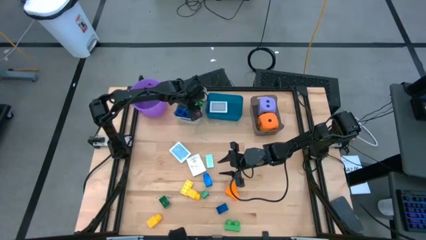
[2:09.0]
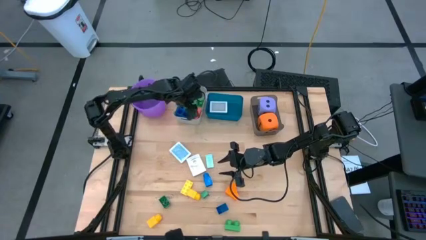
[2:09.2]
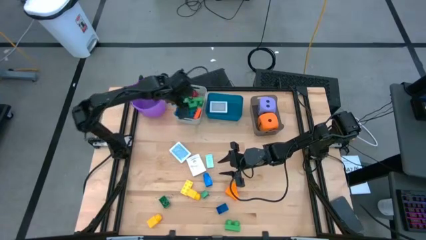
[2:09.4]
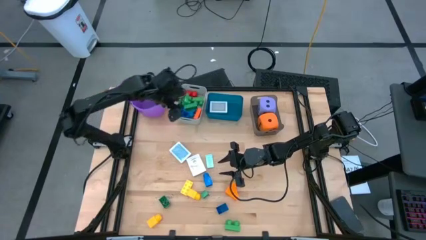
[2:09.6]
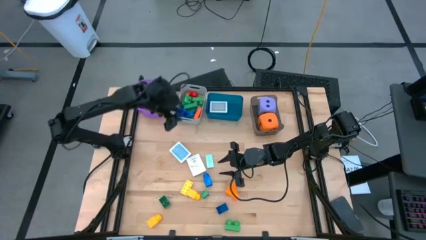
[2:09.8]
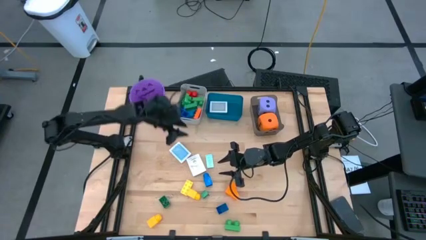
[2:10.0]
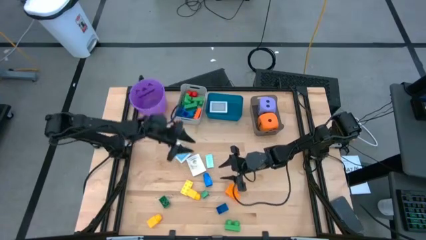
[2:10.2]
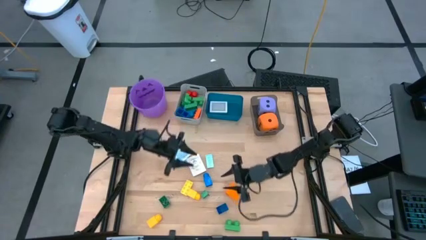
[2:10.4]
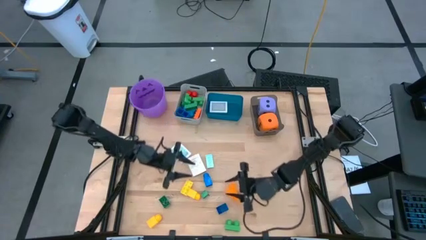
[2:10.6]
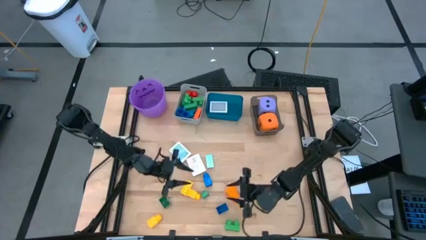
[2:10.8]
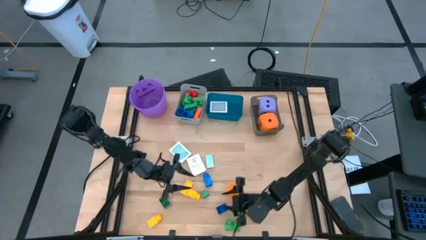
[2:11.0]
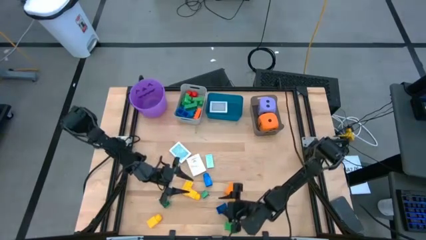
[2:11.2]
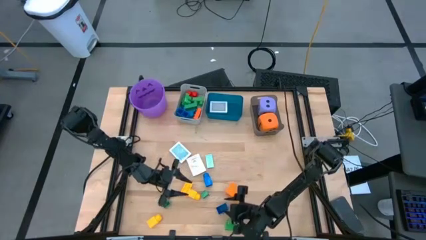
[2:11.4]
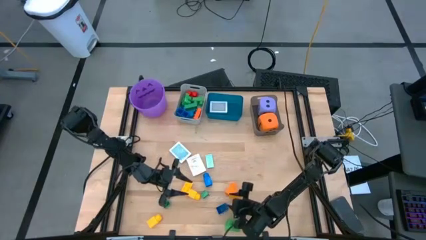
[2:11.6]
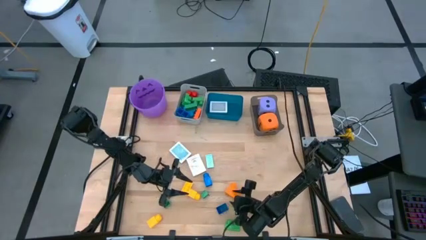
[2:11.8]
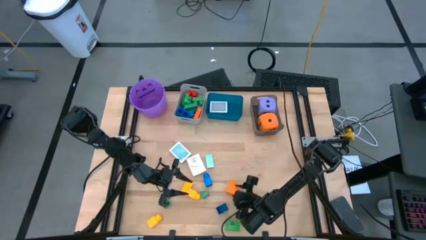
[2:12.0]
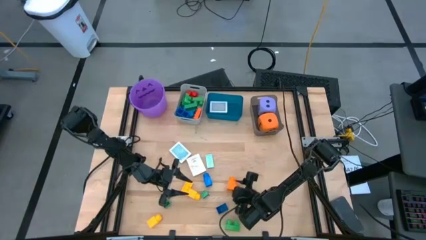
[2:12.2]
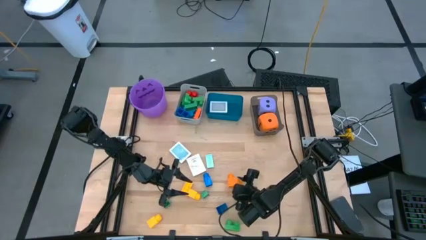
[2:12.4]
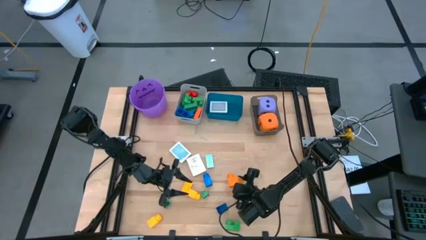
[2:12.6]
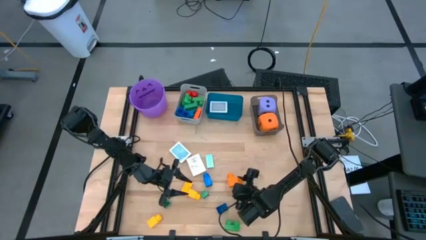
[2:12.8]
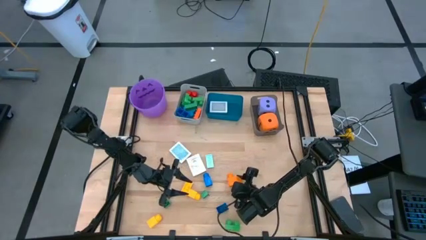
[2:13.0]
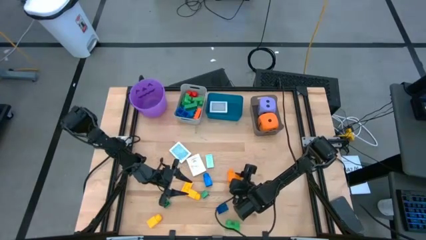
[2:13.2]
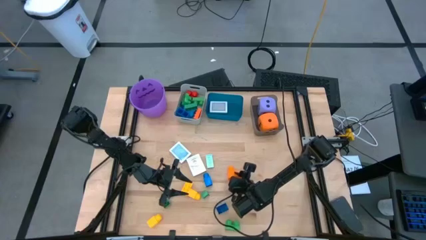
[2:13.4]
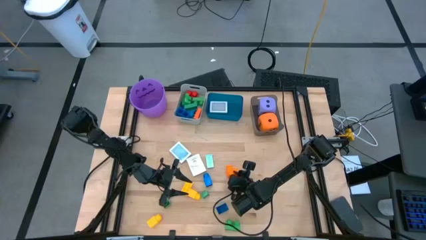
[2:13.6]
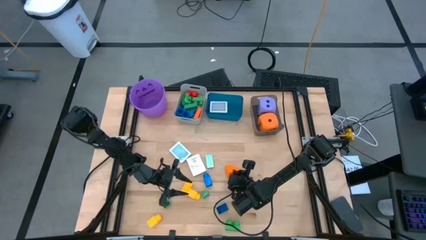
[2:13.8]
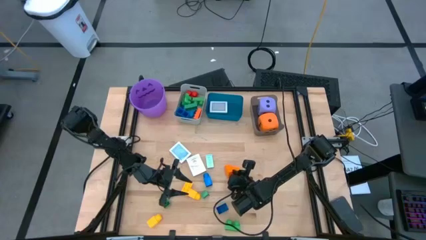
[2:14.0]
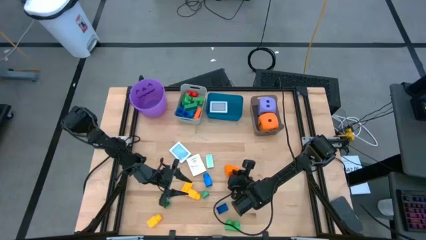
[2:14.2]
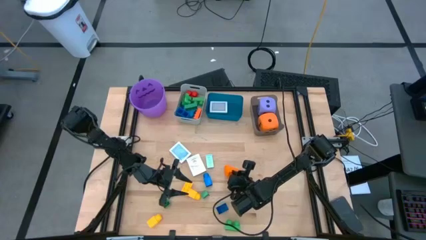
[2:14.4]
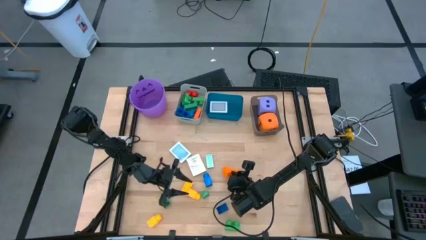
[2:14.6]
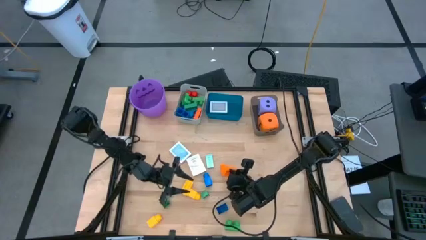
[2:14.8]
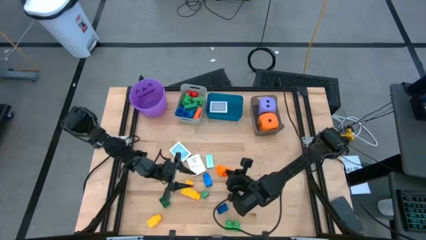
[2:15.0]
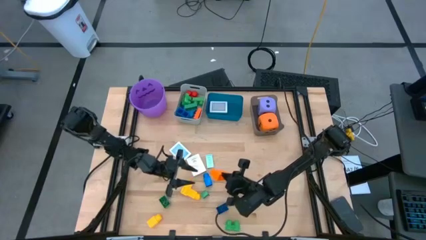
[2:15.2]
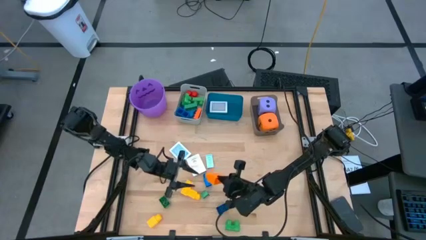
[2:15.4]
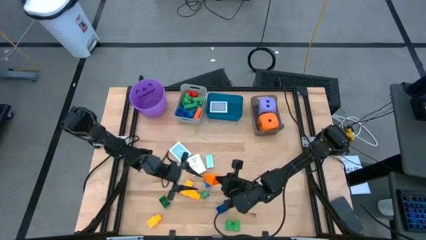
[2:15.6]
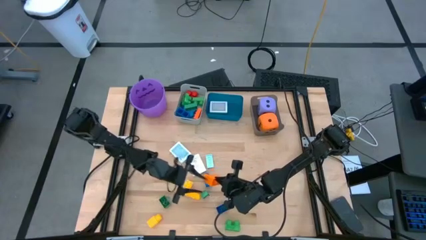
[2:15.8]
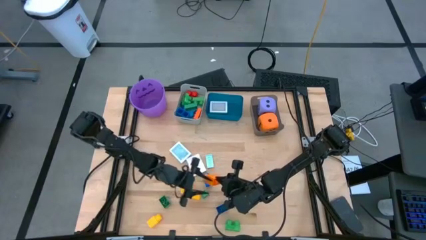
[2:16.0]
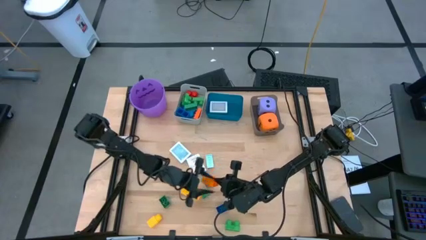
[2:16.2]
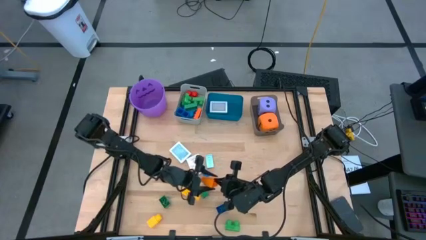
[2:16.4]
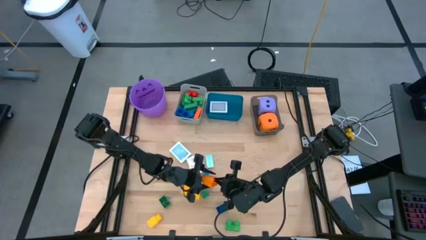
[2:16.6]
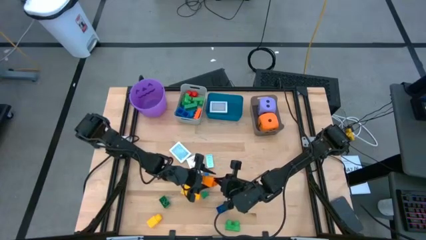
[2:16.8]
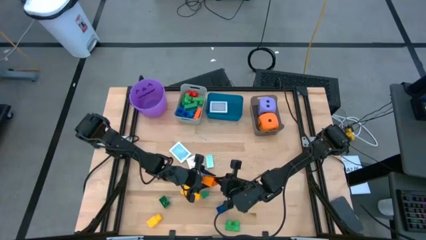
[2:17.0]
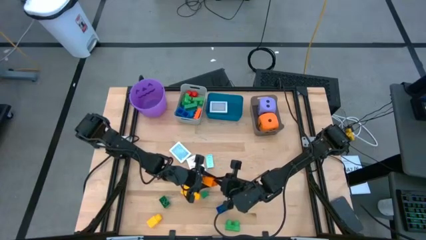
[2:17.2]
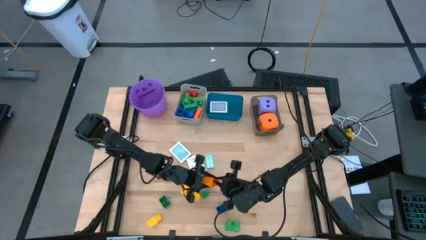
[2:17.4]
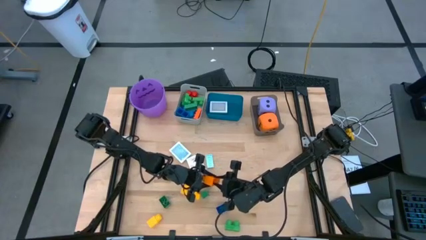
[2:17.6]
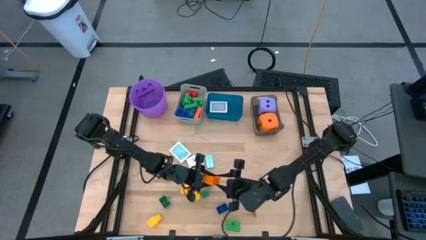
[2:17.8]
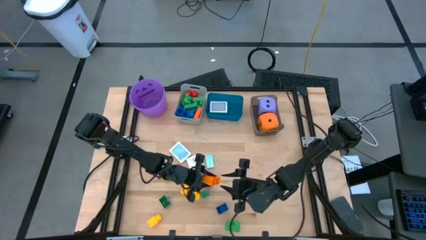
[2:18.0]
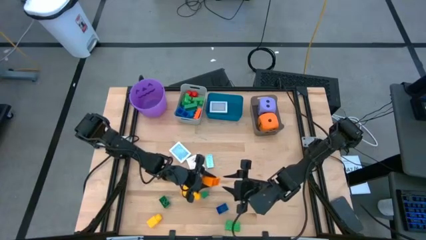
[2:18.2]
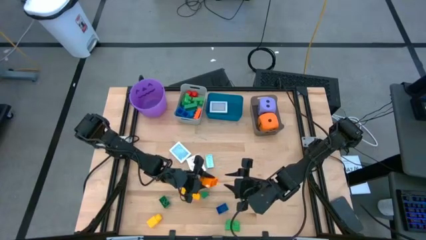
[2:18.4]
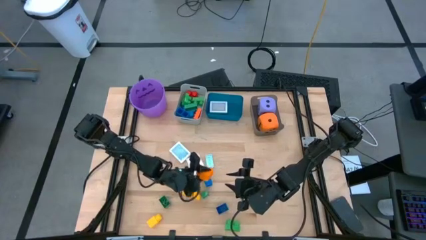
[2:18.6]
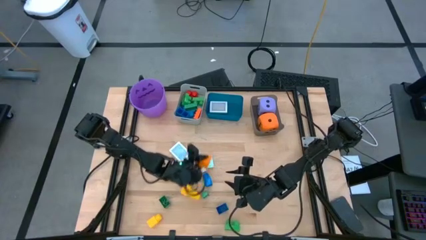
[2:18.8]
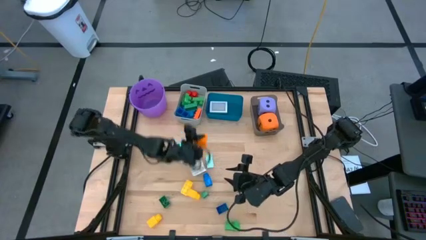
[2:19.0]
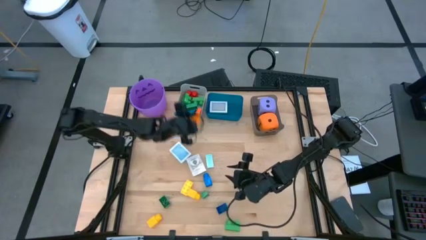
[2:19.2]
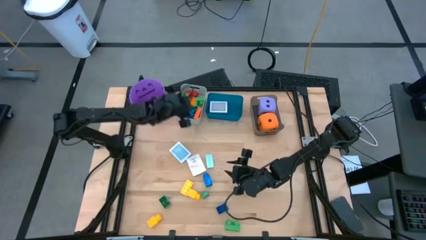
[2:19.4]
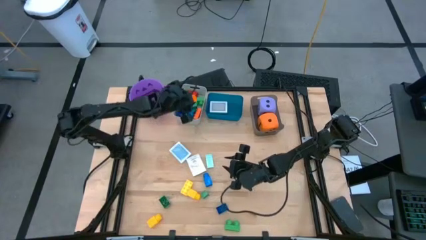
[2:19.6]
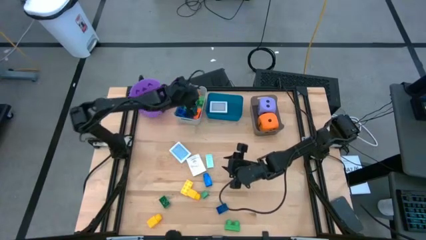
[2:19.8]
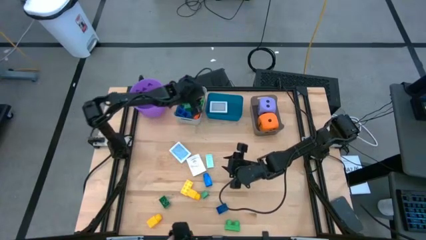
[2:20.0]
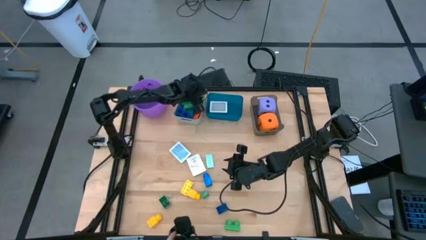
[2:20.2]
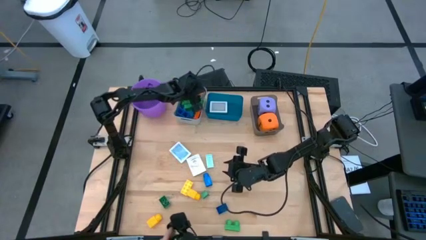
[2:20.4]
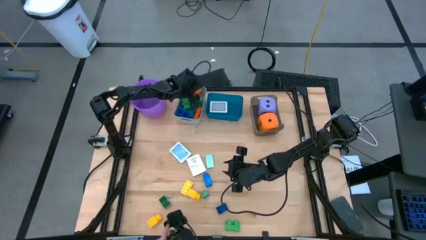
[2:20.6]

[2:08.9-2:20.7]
Task: Pick & Place Toys
Put the orange game piece into the gray bin

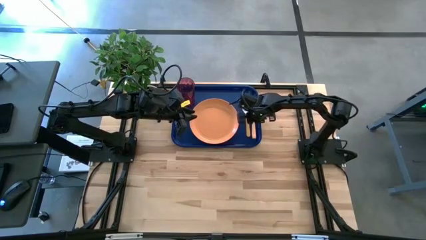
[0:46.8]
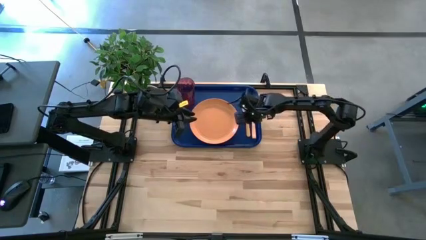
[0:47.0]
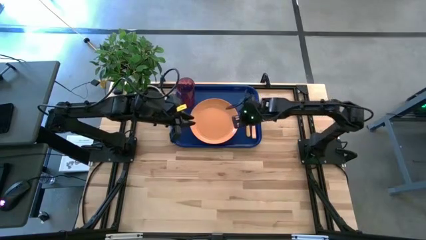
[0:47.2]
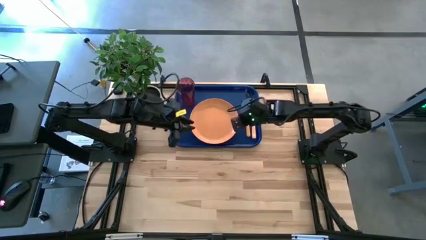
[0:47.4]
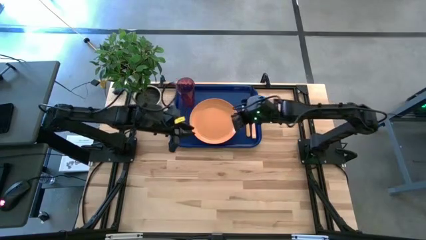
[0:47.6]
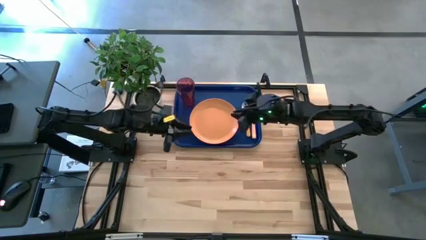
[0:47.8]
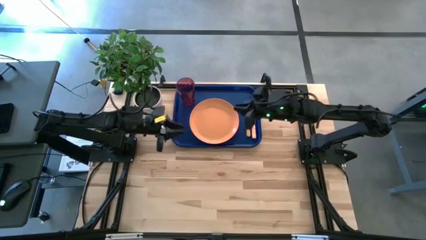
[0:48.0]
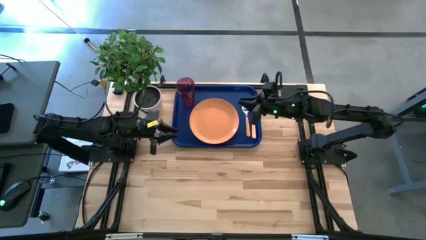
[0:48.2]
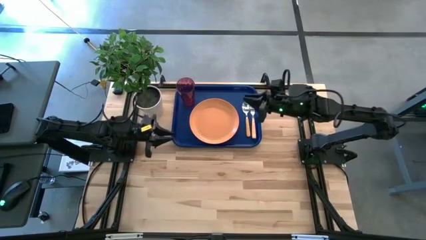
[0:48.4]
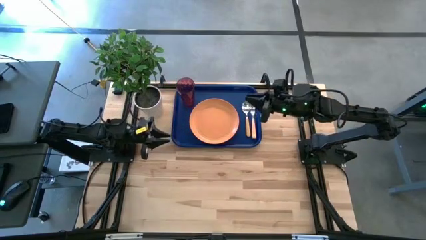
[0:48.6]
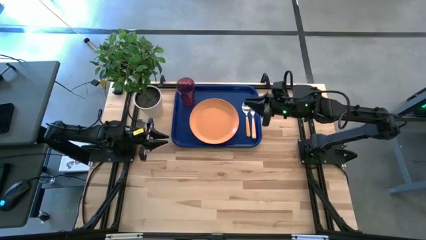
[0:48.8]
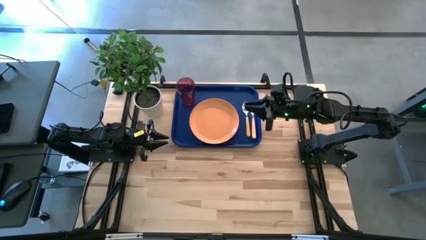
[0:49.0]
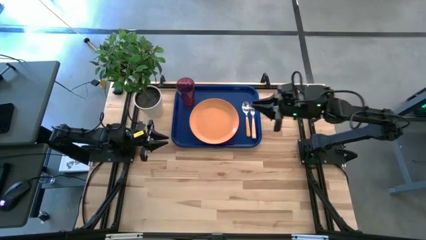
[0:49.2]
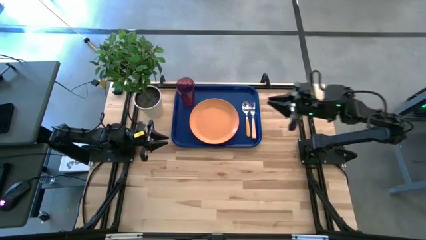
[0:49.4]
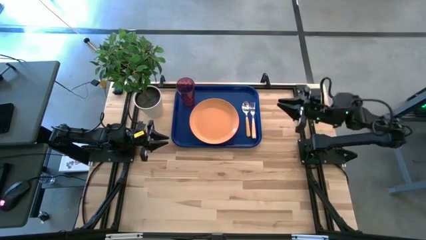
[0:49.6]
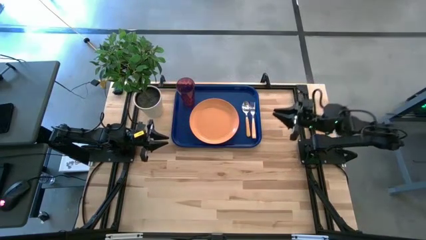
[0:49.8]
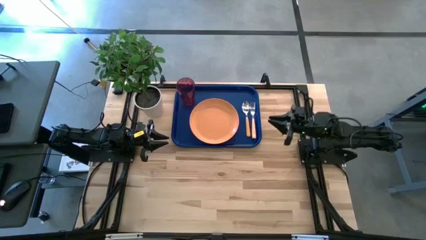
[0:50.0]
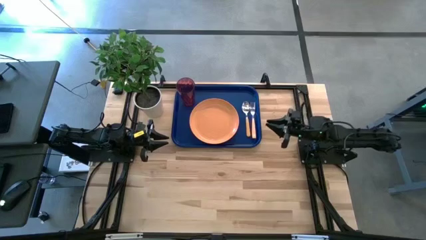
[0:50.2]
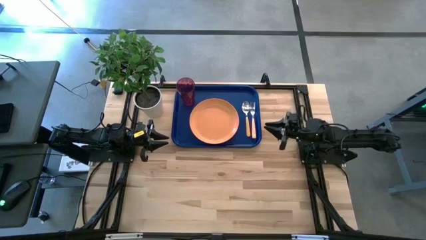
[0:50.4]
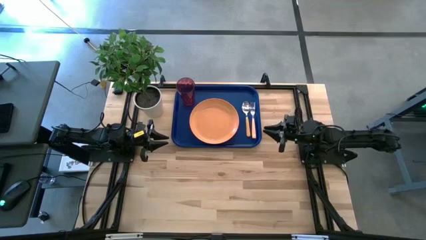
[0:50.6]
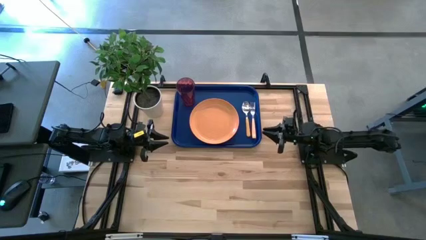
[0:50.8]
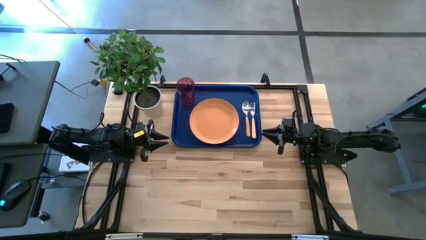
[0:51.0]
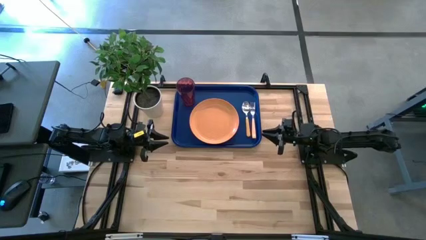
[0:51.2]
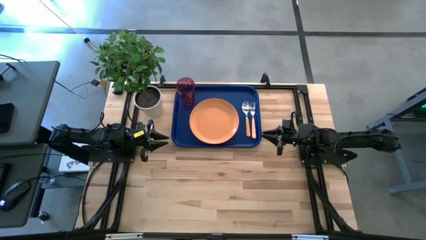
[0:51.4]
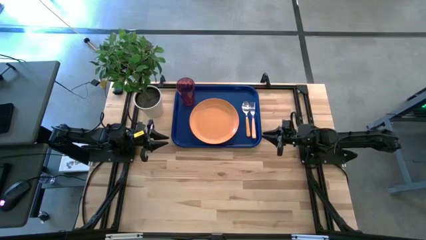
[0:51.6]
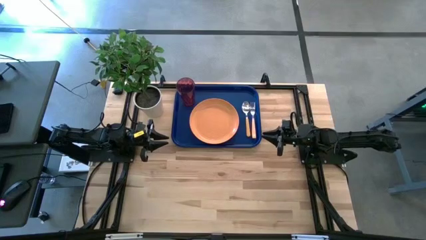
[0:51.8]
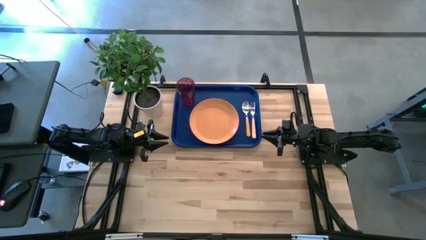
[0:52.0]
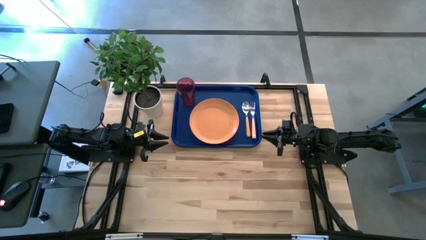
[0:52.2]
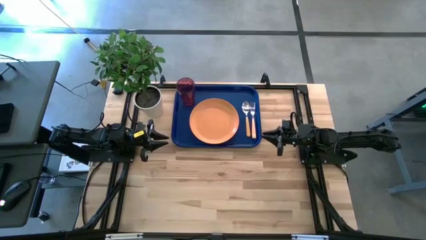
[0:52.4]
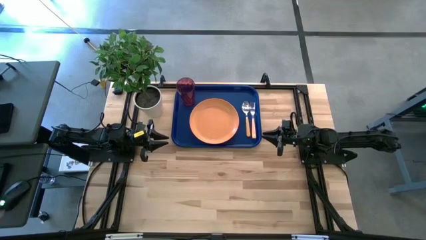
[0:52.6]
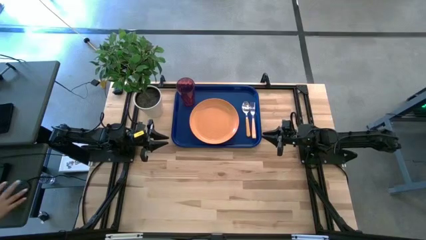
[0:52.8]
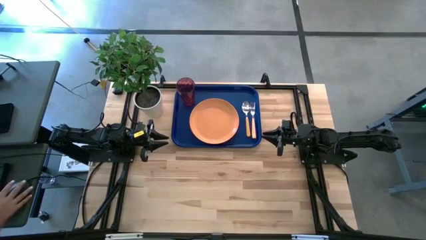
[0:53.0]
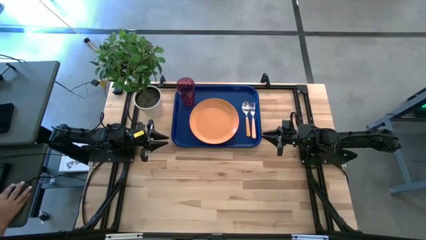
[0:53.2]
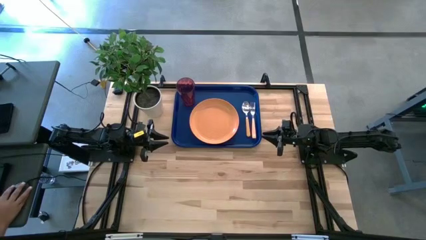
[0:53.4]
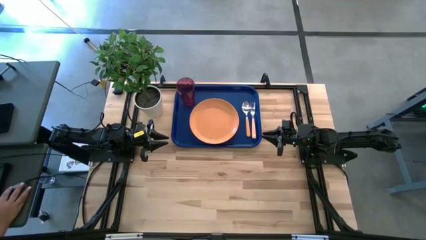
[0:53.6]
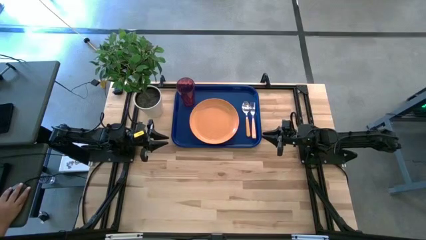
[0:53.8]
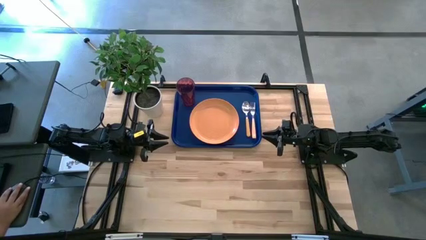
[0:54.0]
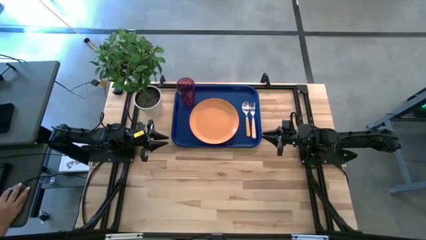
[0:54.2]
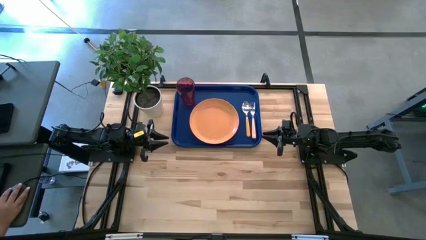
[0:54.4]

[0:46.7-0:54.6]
Task: Pick and place plate/cup/fork/spoon on tray
Return to Home Position
